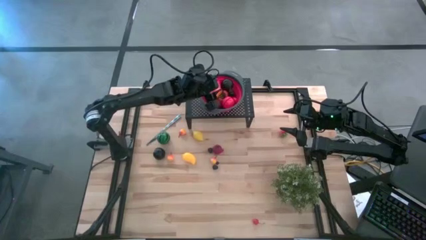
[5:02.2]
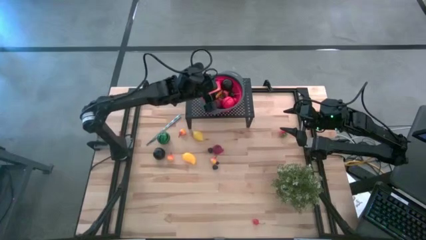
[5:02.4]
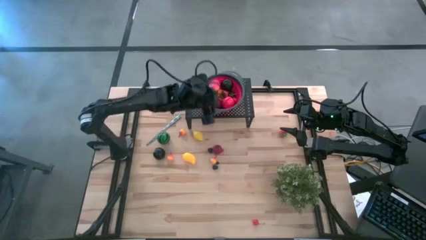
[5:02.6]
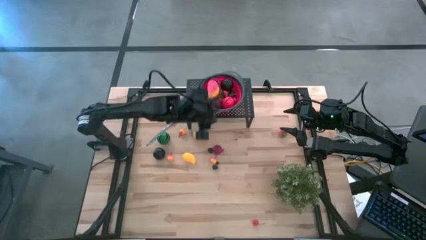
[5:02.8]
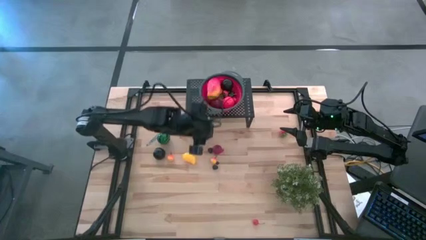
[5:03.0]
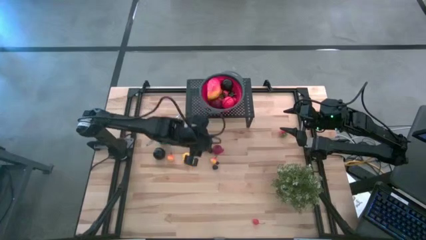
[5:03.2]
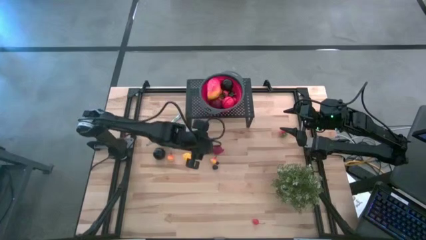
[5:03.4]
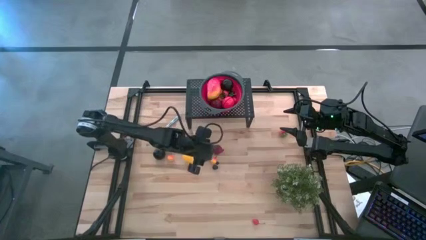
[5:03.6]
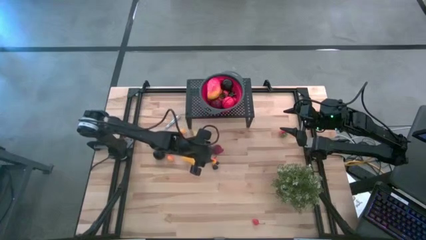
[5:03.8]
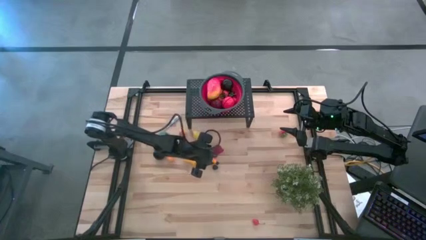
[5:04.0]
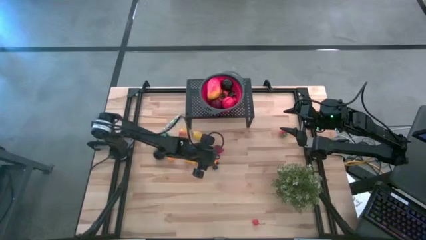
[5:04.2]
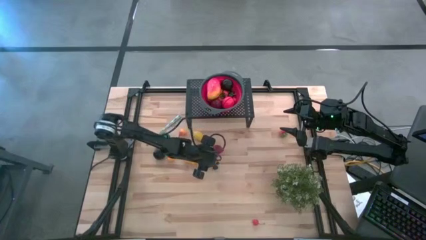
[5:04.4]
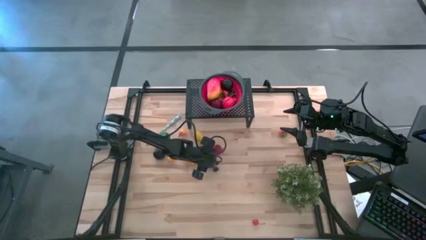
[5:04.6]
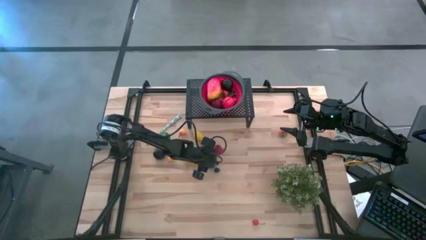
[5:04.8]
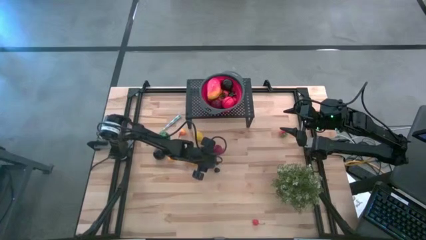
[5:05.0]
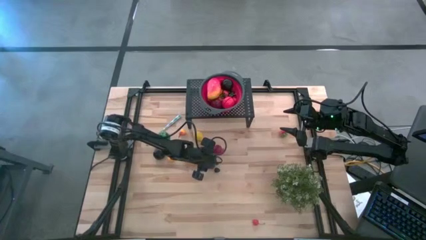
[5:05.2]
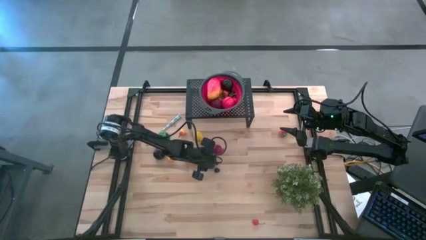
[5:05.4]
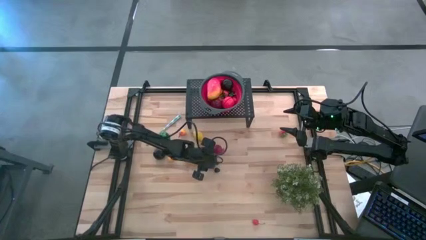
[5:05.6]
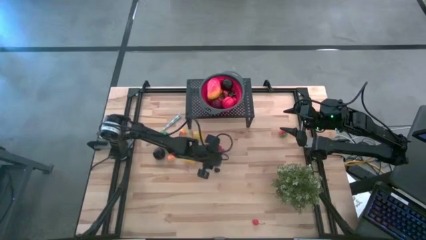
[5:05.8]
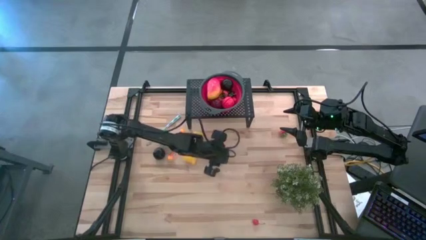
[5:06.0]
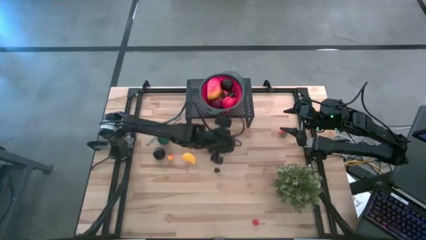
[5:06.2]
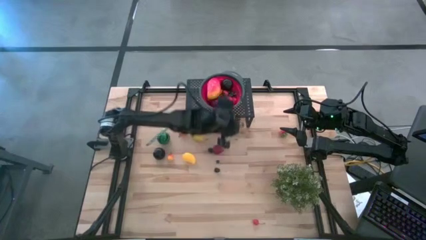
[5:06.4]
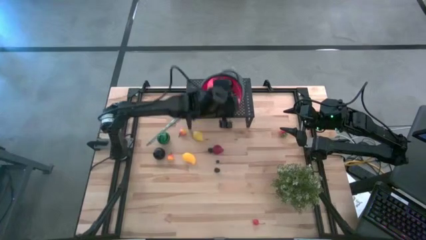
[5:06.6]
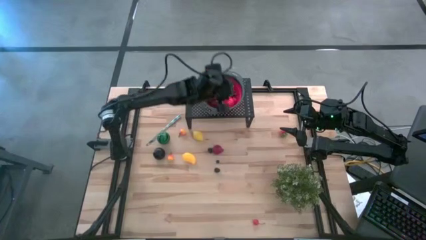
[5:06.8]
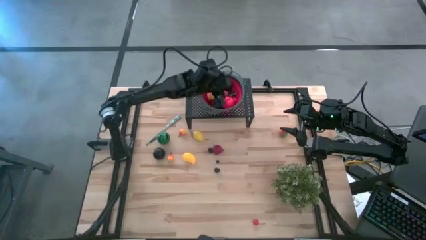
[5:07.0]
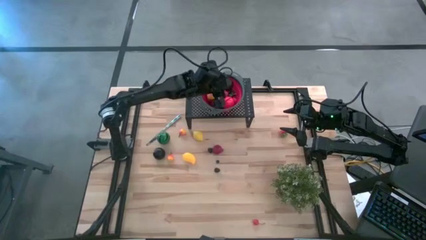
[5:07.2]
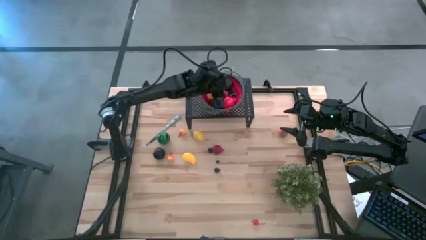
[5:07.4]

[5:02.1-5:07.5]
Task: Pick & Place Fruit
Put the peach in the red colander on the shelf

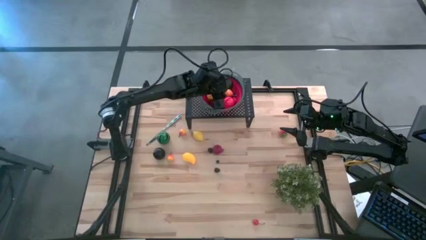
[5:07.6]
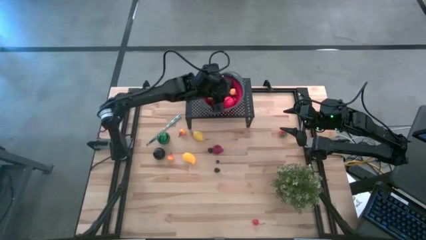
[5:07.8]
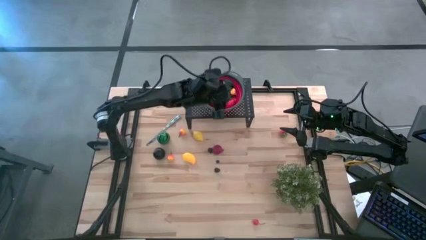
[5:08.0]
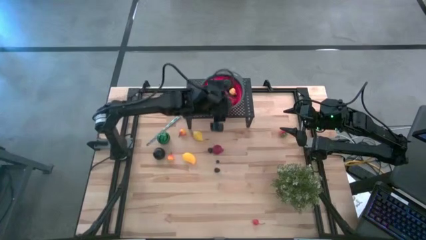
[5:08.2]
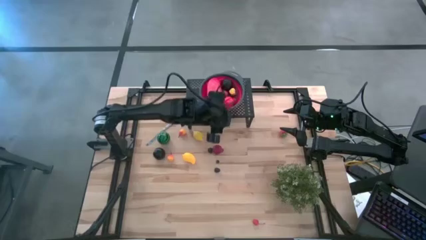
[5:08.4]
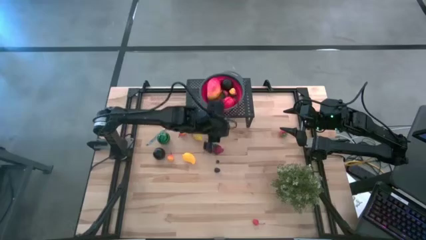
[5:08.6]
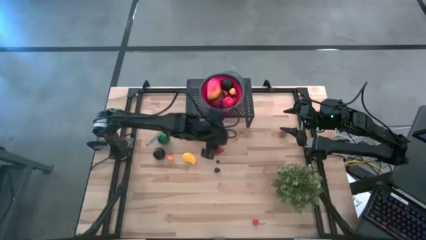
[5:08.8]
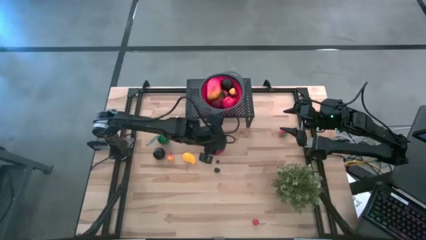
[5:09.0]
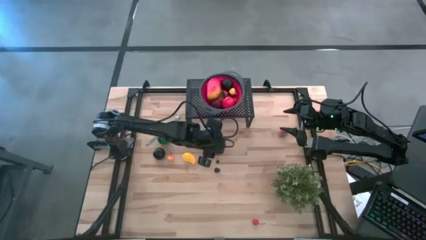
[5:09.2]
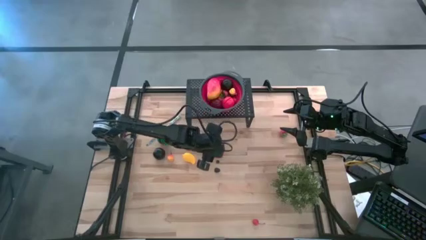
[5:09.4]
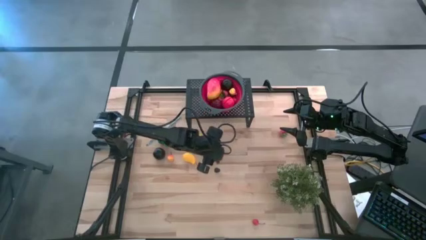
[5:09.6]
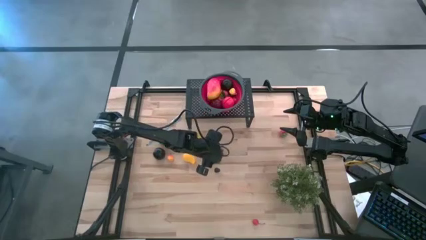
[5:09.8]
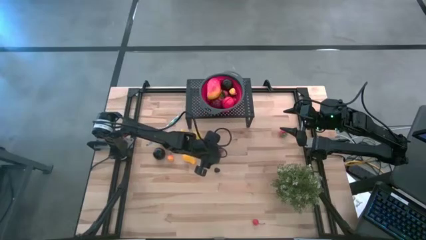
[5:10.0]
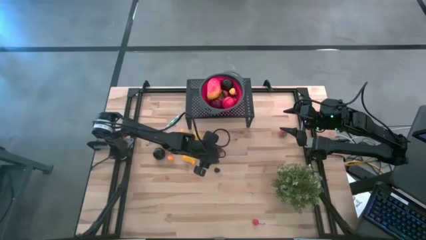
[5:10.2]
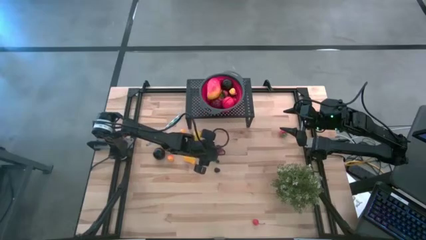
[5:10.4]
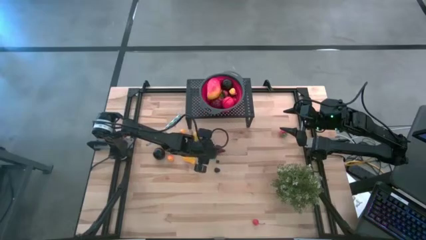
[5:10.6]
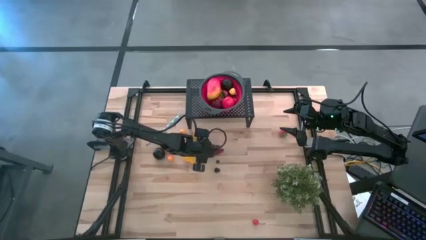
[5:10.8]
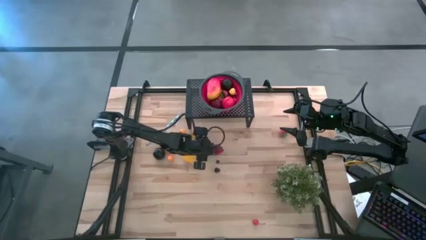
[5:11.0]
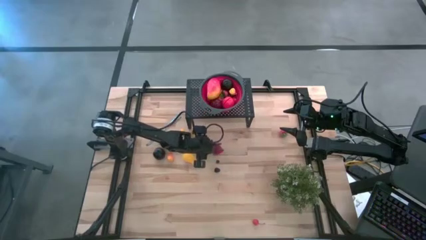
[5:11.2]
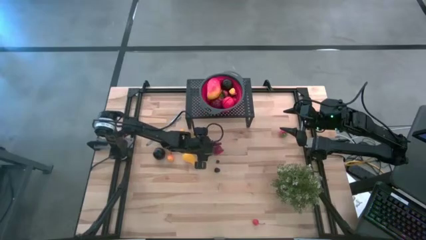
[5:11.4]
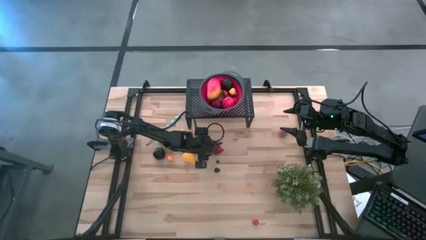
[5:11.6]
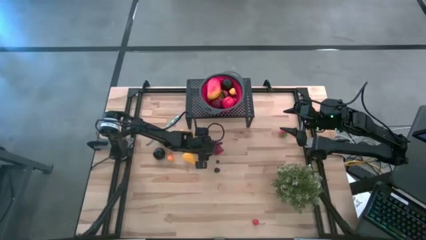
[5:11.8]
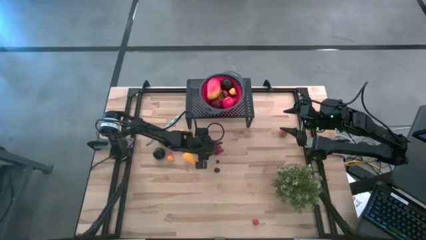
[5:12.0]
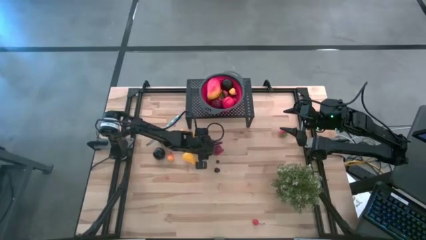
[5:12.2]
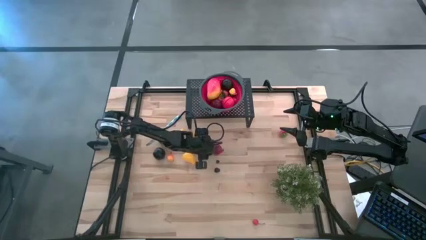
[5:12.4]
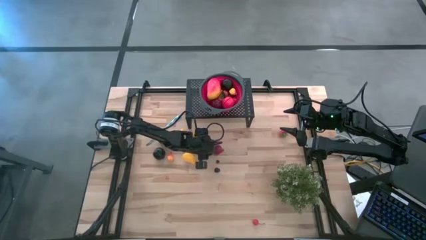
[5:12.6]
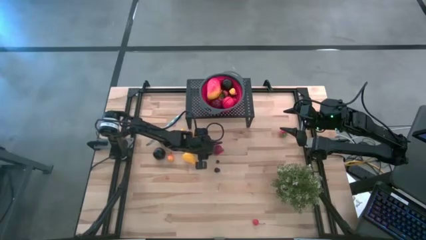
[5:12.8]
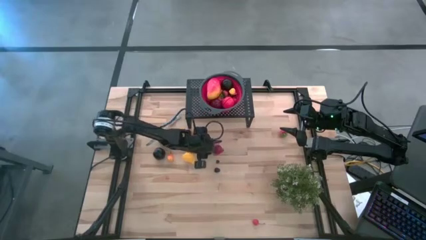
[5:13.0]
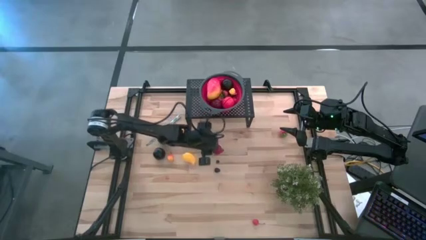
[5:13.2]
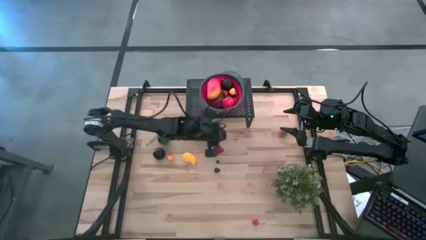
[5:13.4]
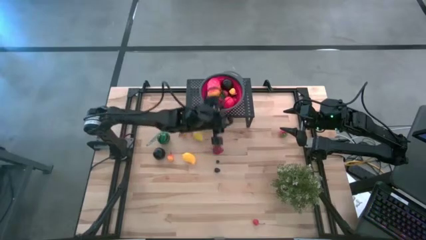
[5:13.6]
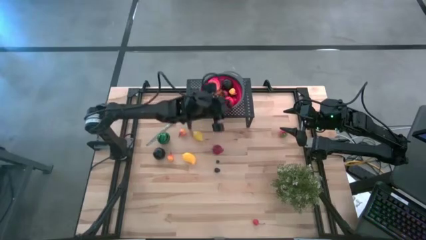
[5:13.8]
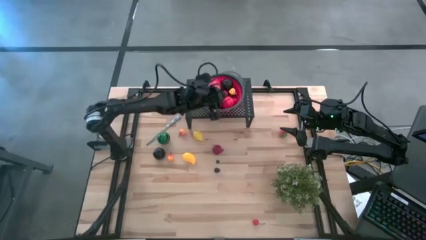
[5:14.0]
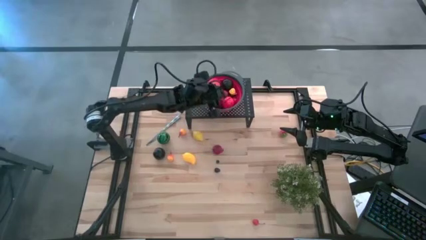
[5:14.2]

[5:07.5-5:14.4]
Put the blackberry in the red colander on the shelf

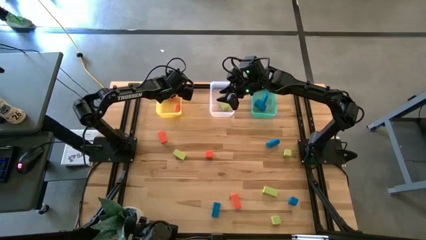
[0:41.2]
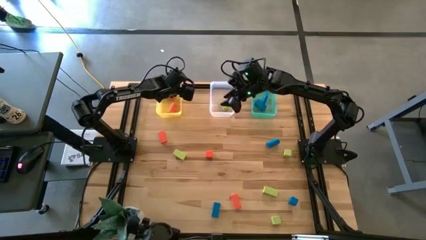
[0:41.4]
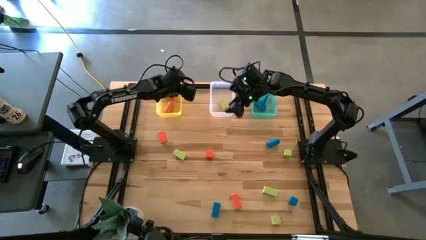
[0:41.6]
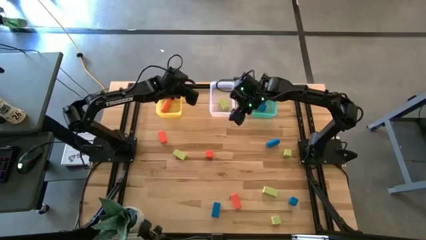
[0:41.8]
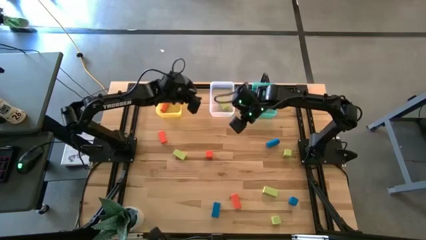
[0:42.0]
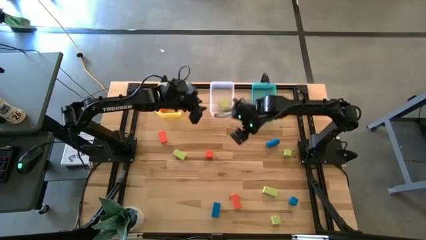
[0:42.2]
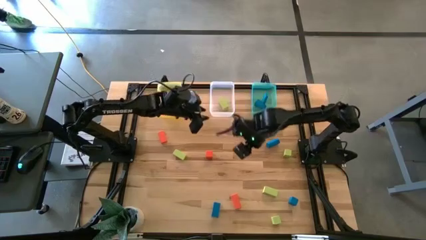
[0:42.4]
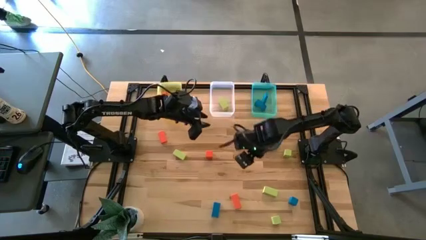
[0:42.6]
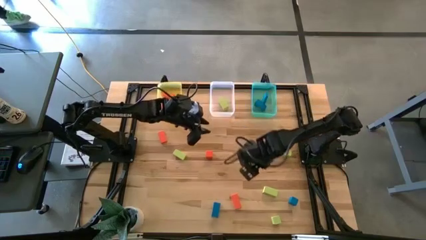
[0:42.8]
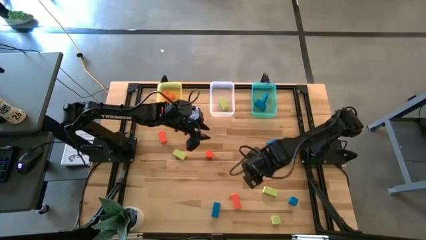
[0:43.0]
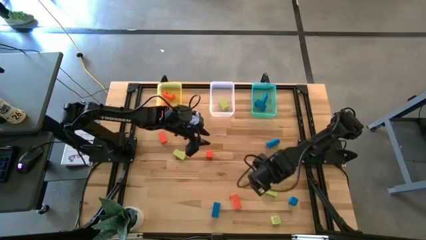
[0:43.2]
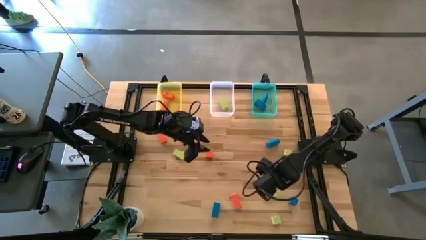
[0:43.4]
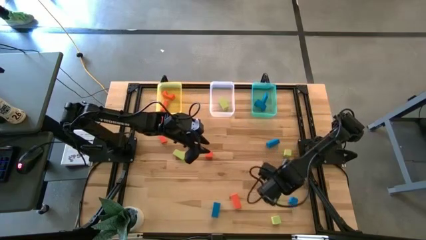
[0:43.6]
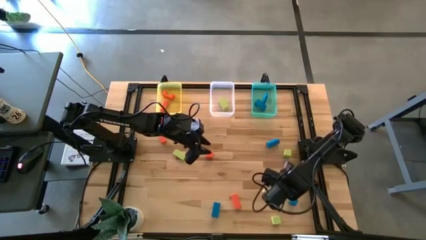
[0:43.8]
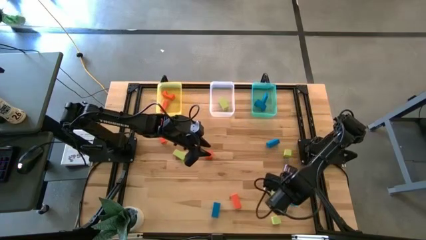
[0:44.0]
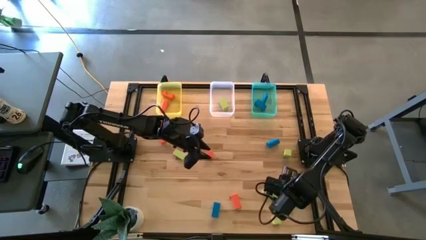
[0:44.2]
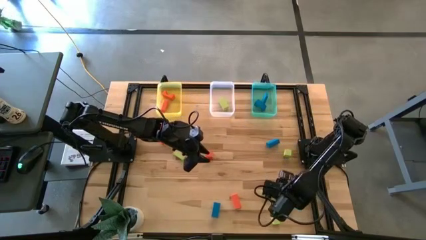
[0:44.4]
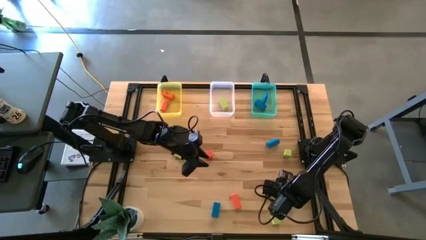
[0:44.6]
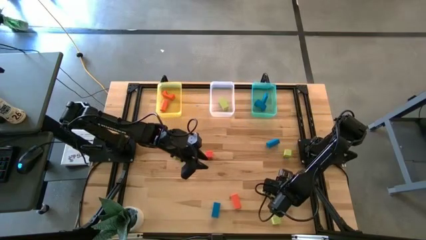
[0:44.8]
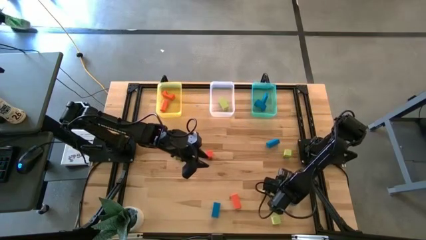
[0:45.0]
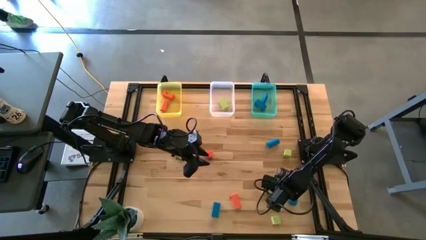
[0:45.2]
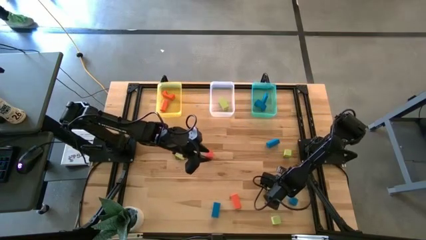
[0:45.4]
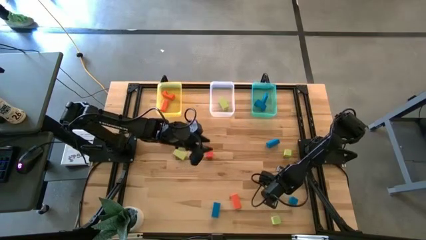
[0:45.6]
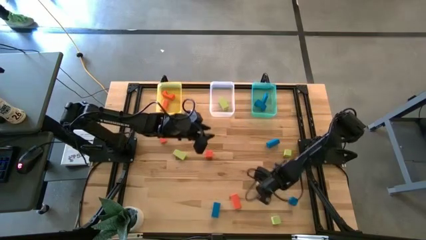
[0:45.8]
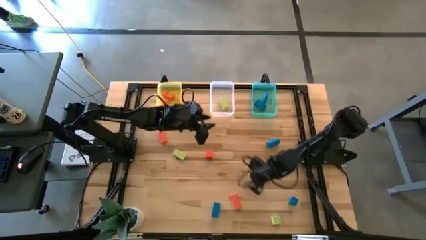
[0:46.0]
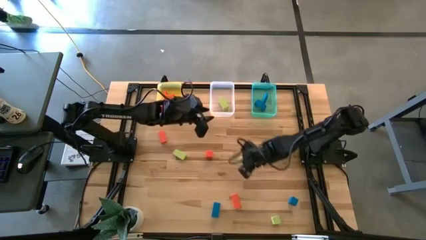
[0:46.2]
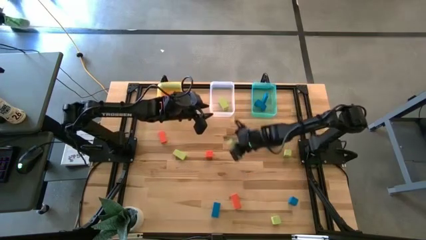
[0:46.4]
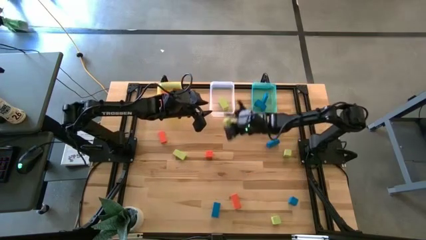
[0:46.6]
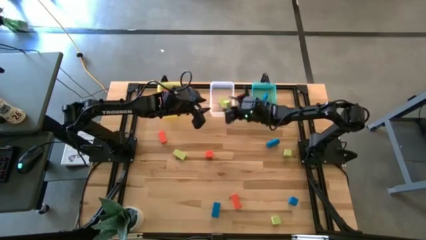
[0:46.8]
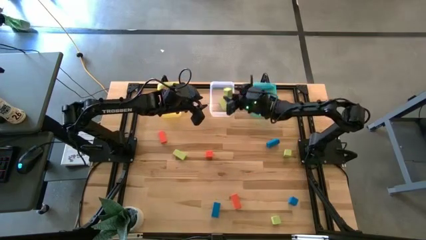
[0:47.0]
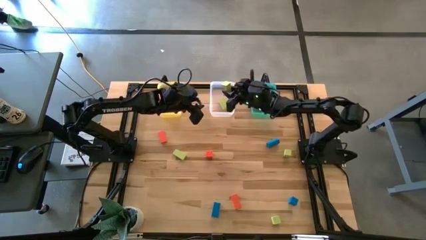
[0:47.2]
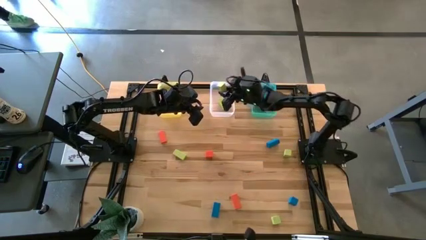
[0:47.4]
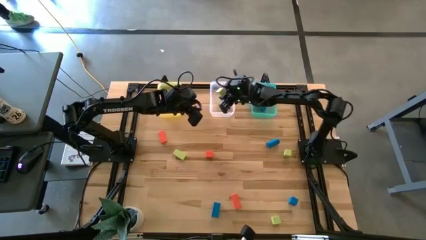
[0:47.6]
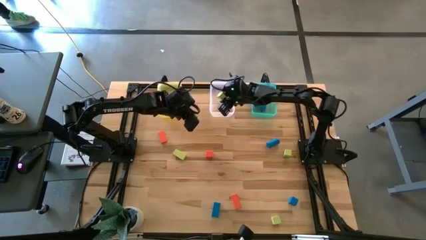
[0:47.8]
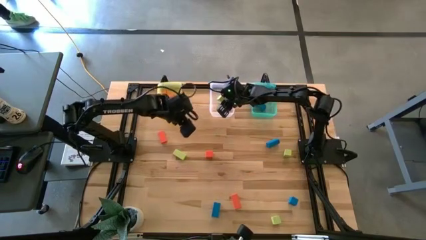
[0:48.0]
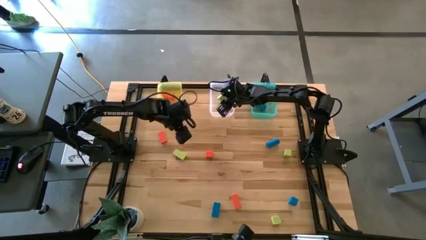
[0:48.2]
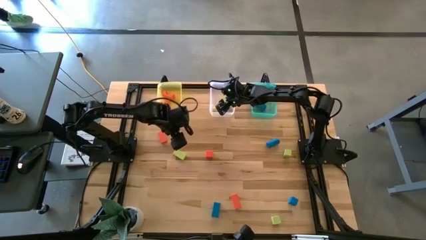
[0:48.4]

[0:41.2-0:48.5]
Task: Sort & place blocks by color
Put the green block into the transparent bin
